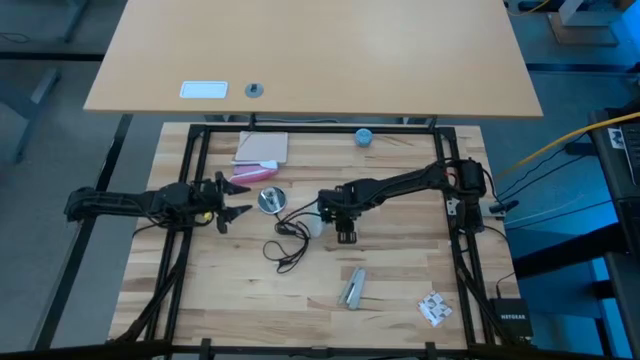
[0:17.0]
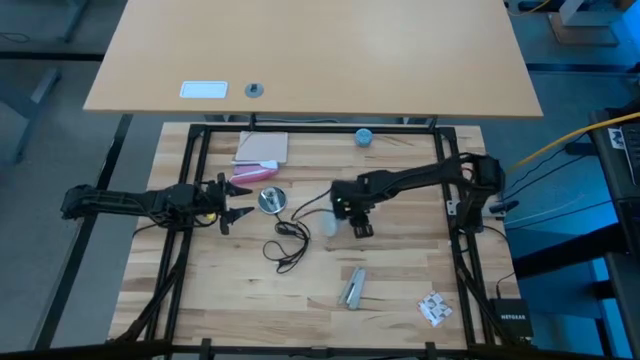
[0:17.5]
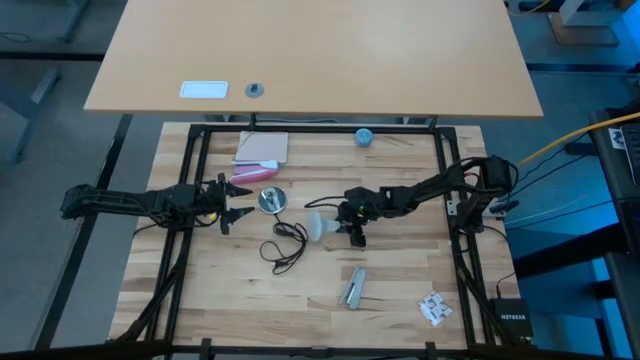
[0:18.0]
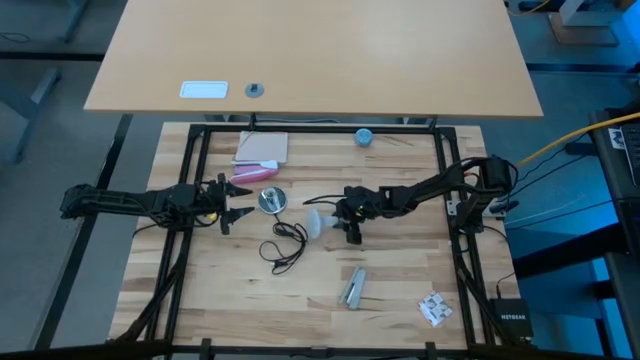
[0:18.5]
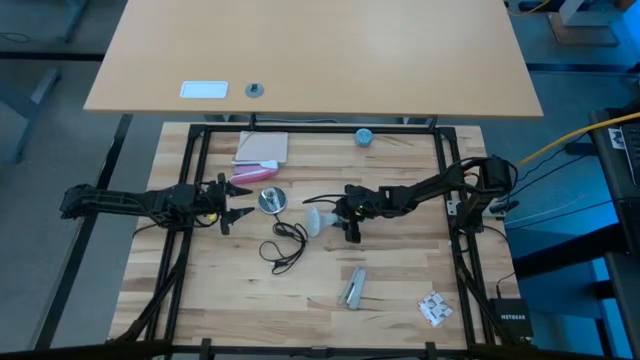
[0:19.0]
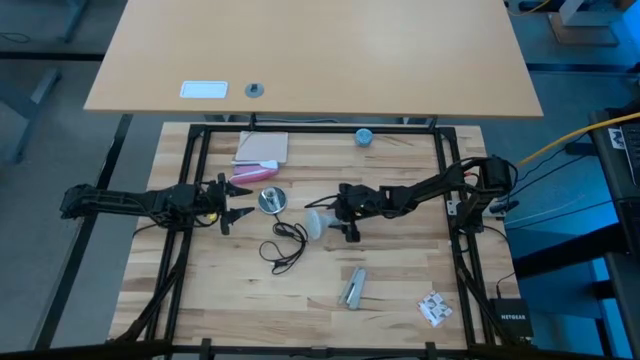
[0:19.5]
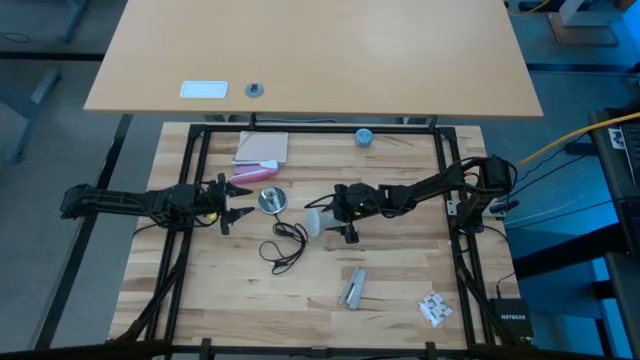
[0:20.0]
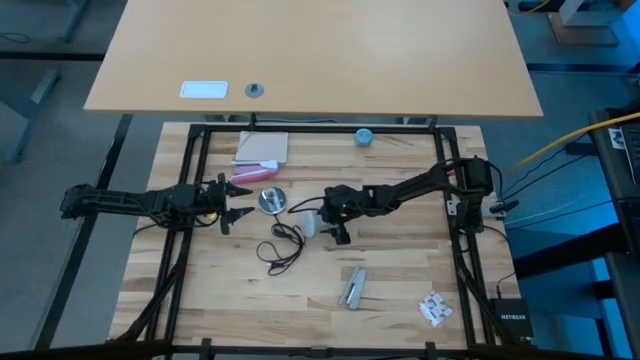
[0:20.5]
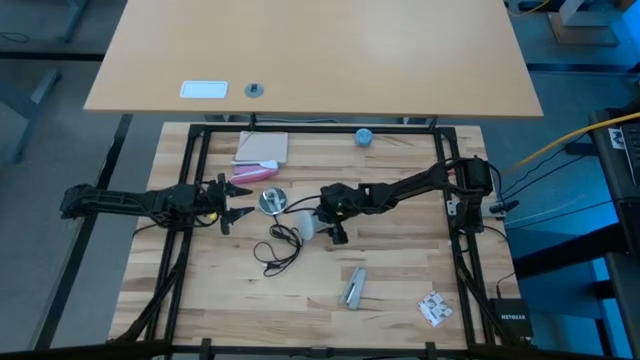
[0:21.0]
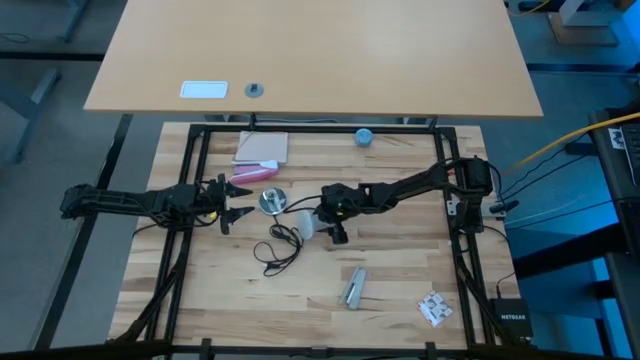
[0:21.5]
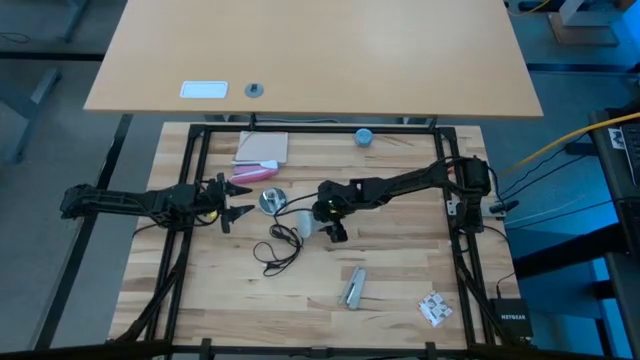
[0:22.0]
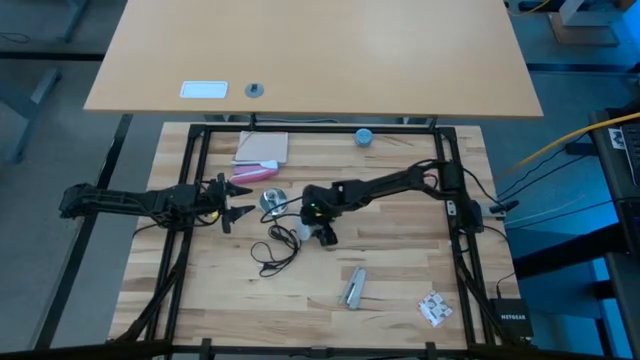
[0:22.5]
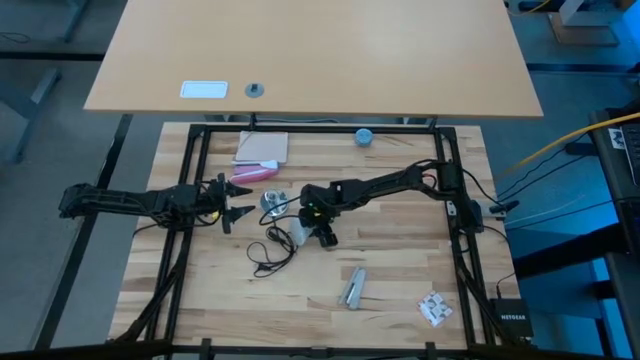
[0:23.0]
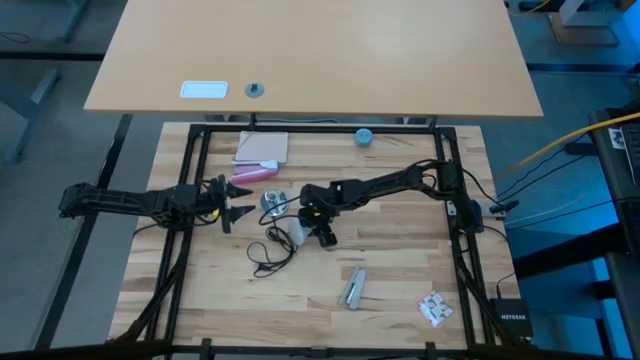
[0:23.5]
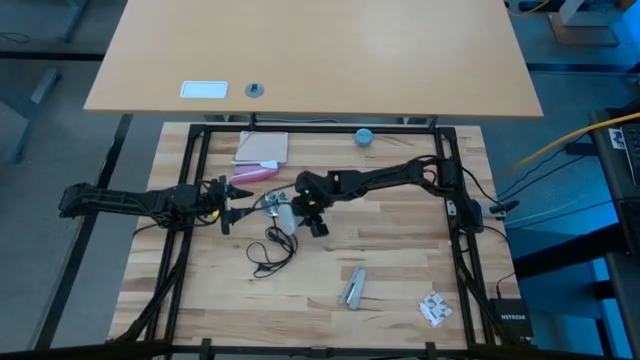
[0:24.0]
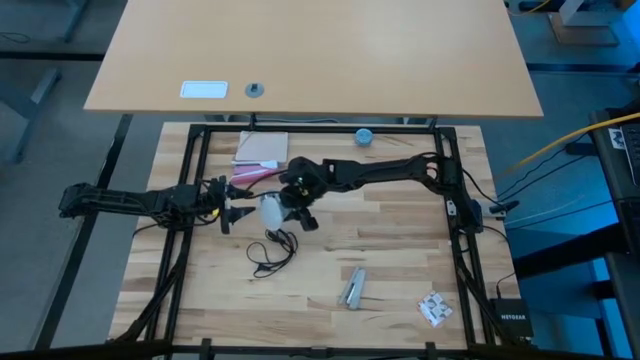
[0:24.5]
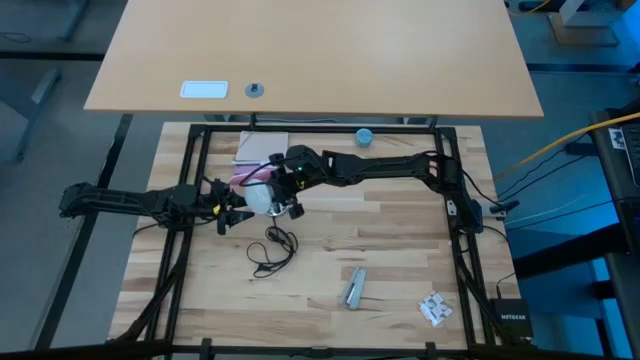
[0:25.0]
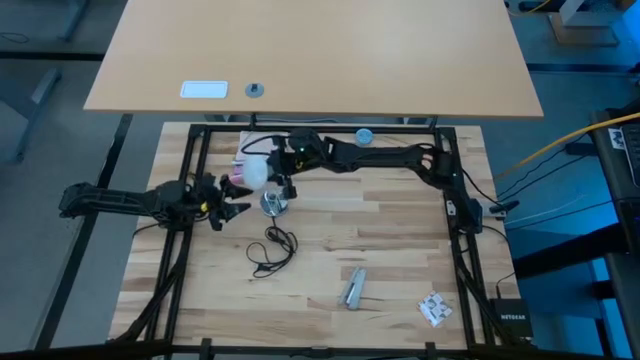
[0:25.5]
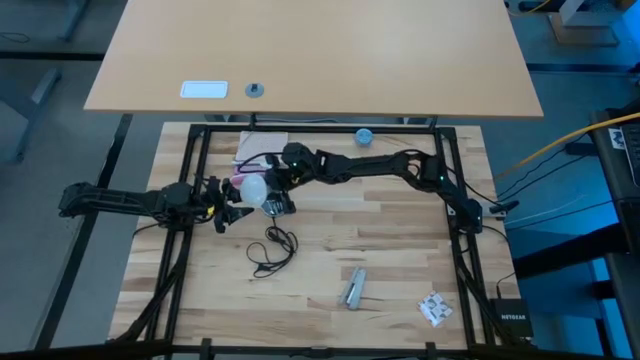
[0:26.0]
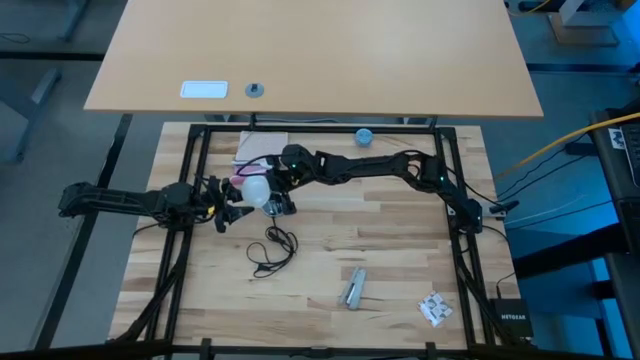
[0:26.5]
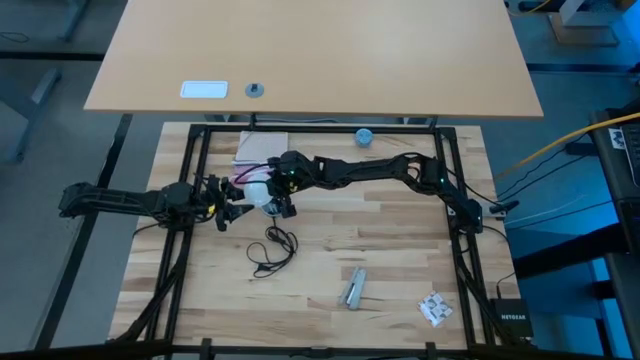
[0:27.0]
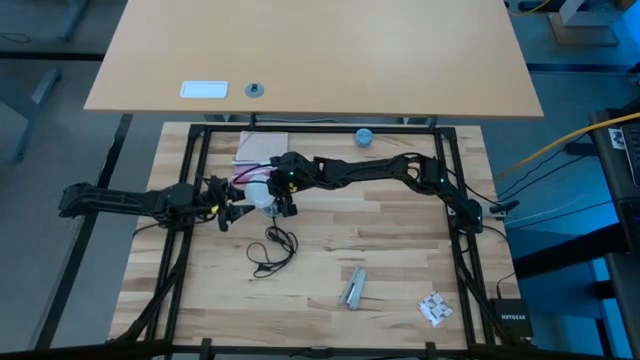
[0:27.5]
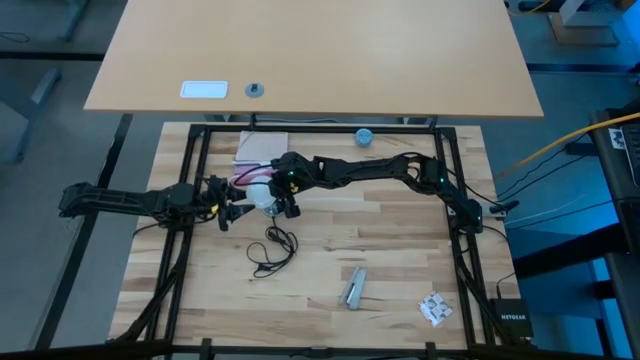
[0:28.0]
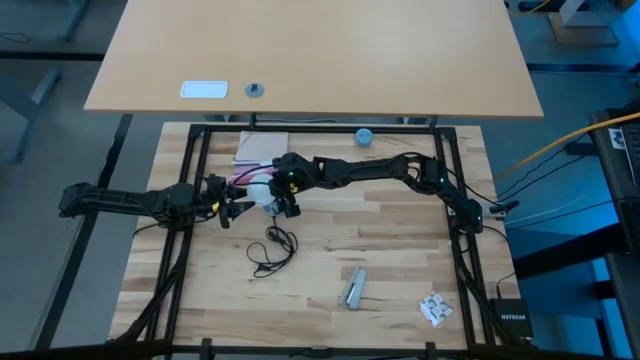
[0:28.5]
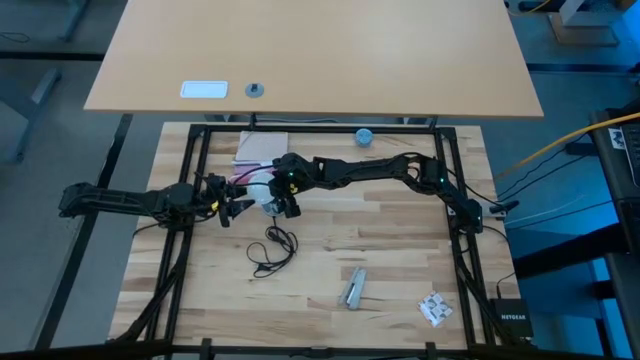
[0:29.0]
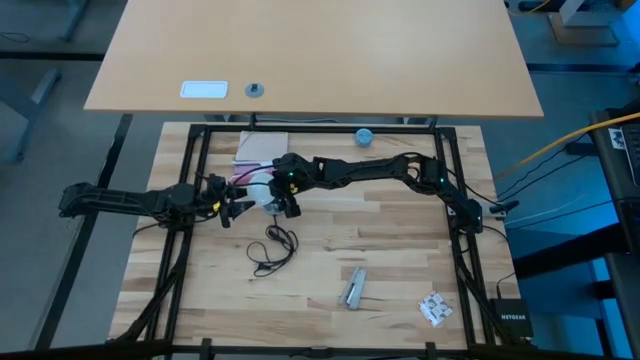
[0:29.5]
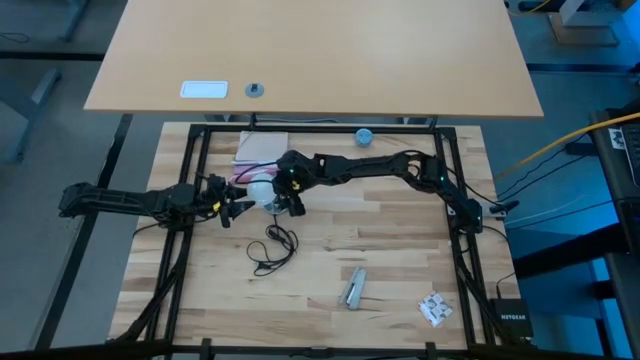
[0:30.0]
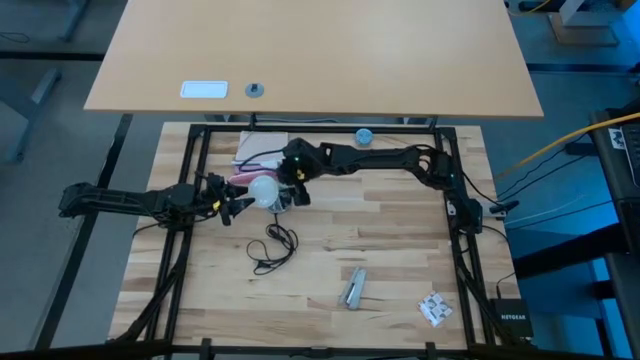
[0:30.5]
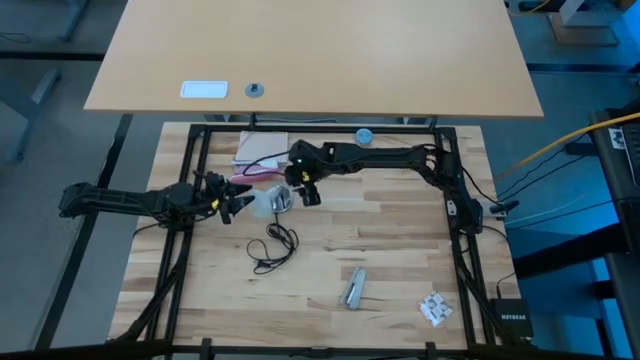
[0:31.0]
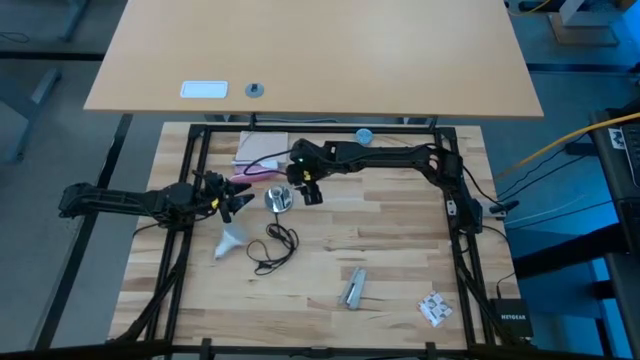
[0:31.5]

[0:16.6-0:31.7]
Task: Screw lightbulb
Insert the lightbulb into the lamp

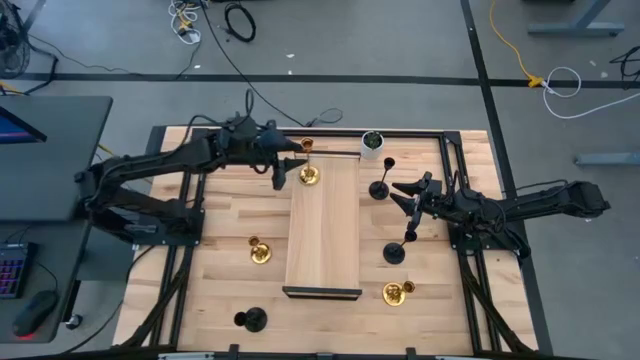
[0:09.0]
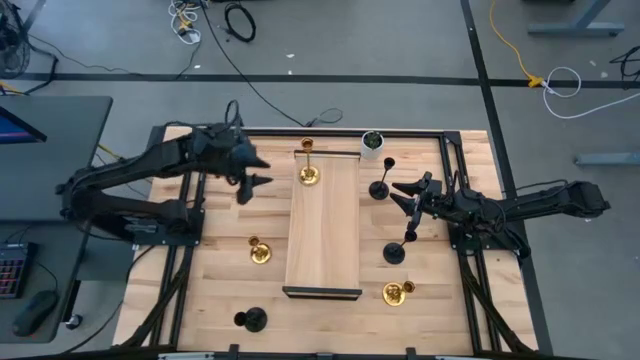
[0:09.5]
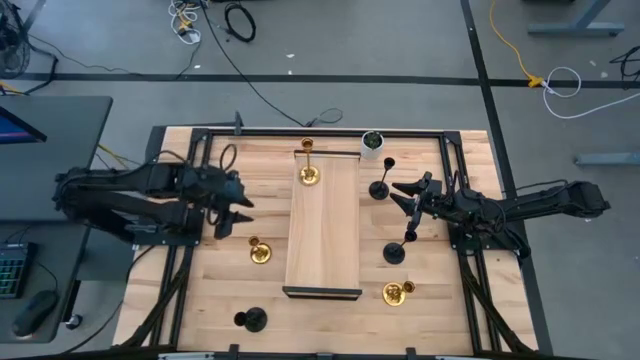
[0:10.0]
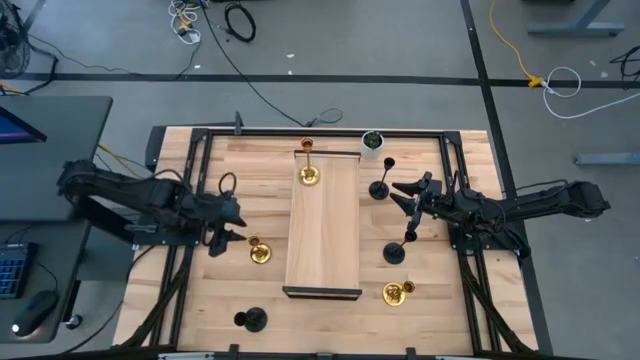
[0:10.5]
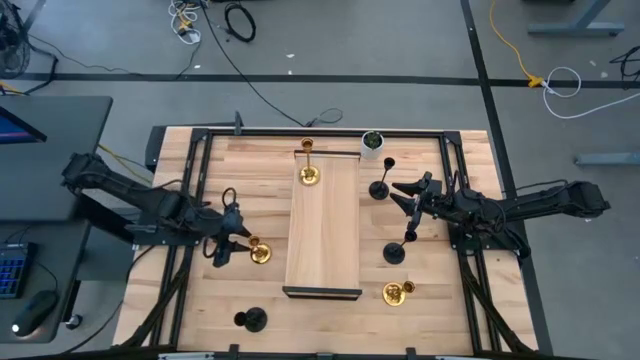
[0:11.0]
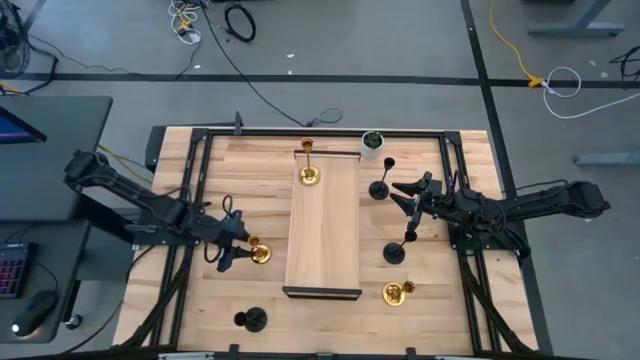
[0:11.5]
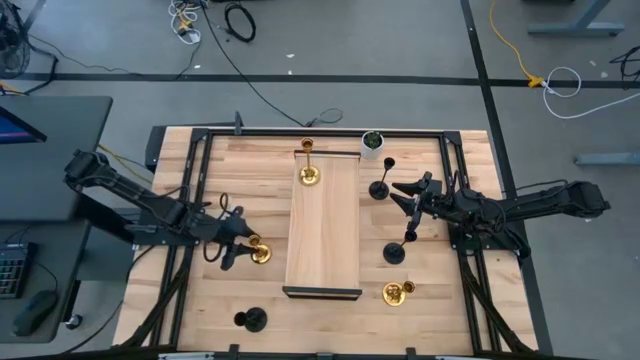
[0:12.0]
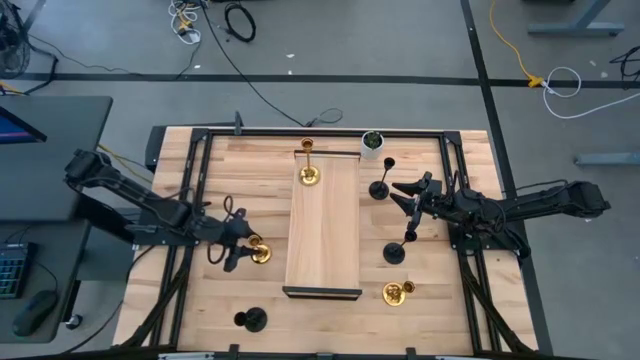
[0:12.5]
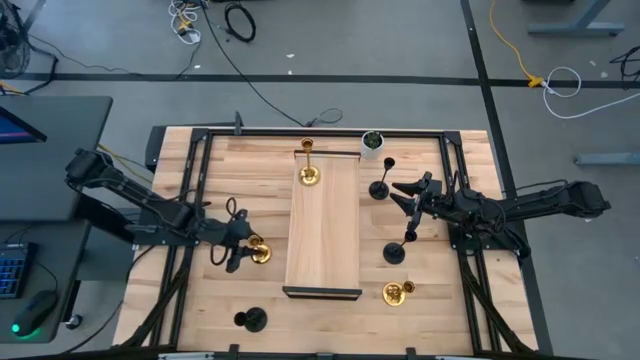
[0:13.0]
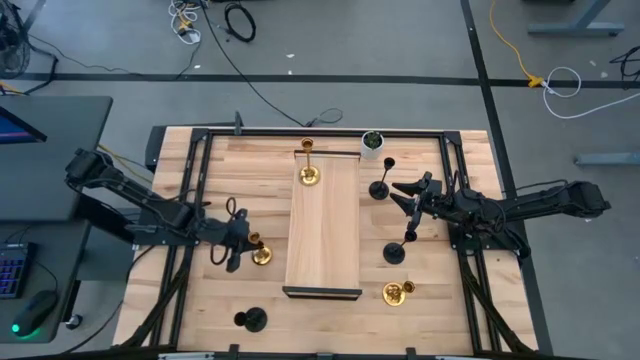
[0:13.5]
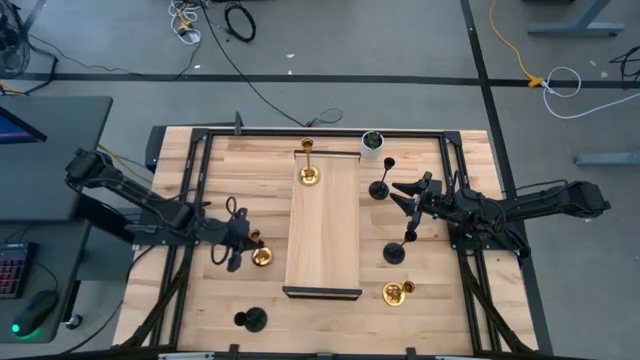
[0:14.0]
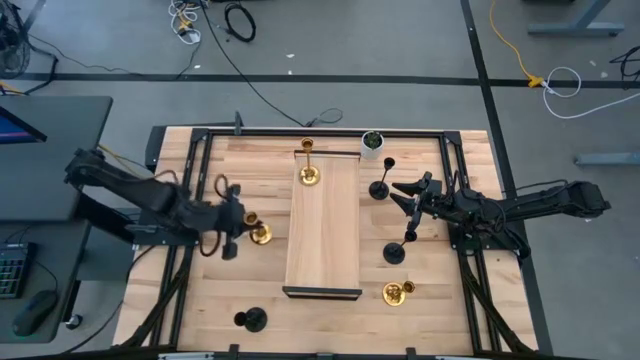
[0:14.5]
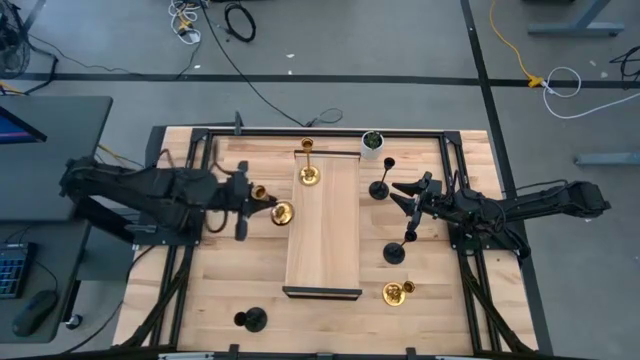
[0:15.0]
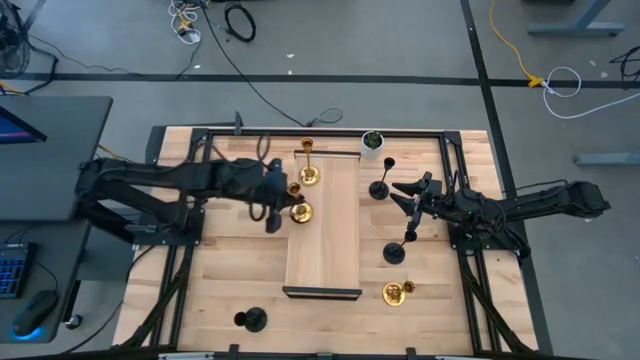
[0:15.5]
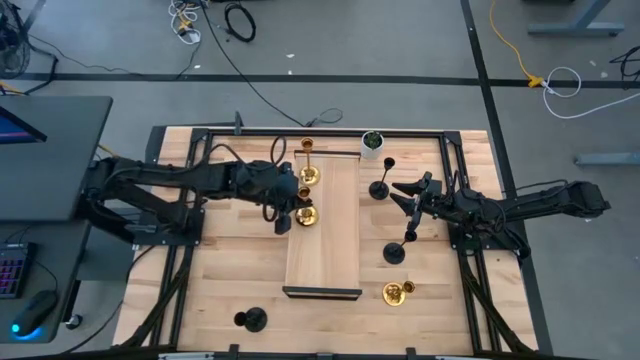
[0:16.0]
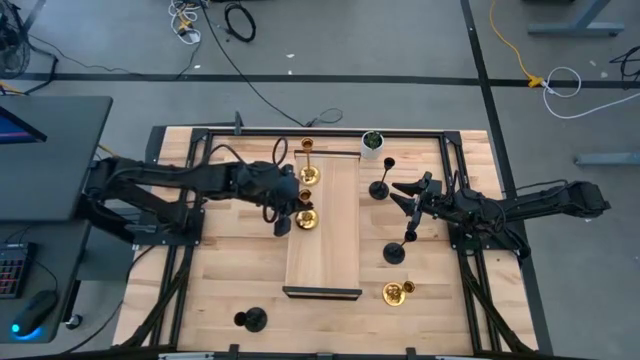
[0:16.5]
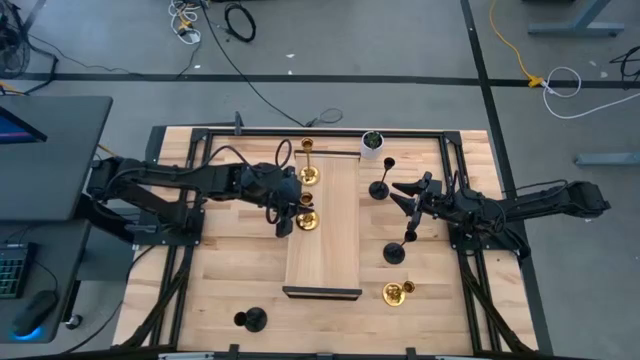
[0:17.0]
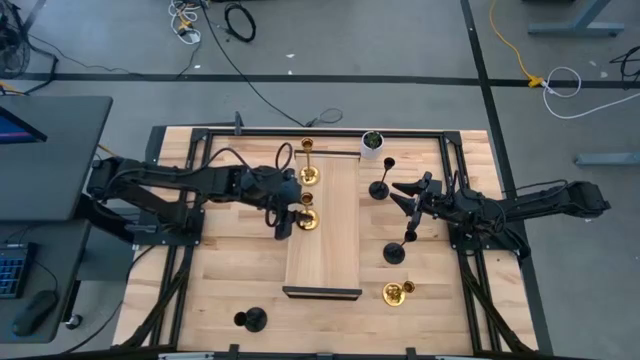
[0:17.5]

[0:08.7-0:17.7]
Task: Pick & Place candle stick holders
Put the left gold candle holder on the shelf
